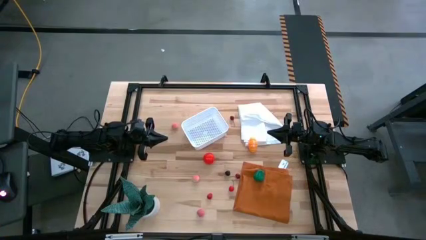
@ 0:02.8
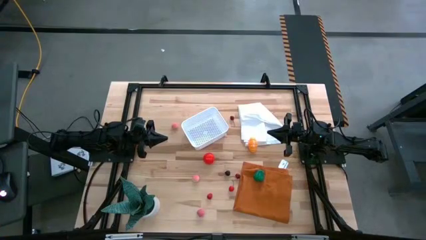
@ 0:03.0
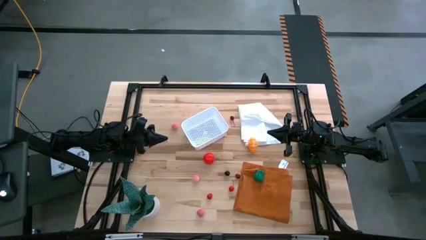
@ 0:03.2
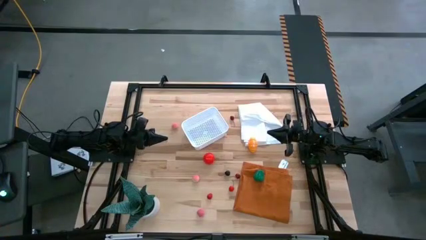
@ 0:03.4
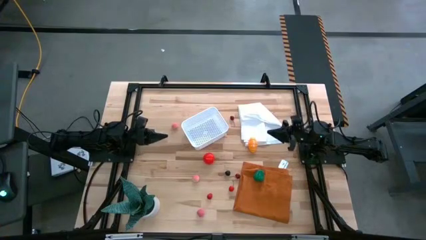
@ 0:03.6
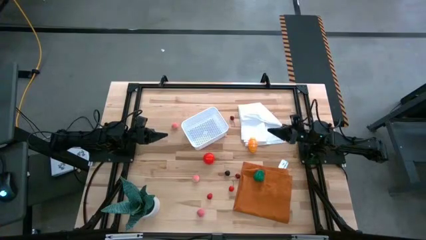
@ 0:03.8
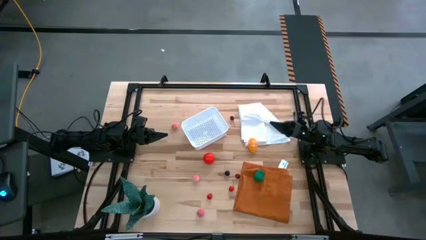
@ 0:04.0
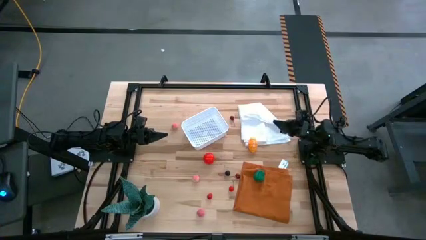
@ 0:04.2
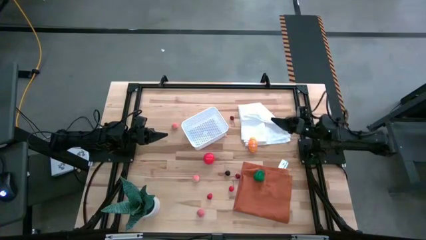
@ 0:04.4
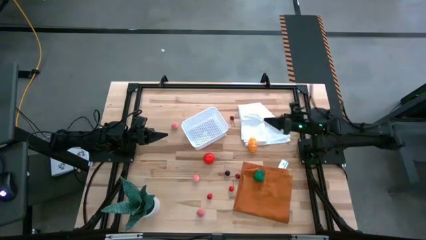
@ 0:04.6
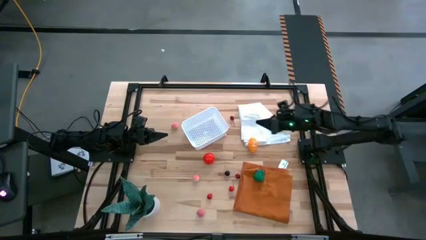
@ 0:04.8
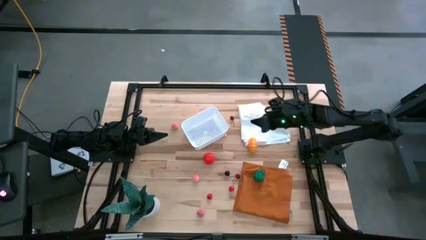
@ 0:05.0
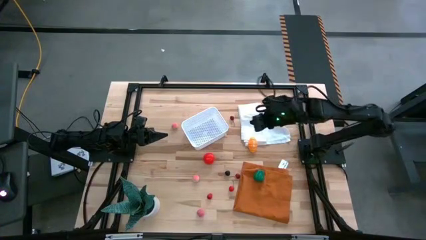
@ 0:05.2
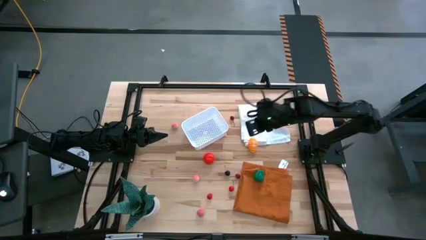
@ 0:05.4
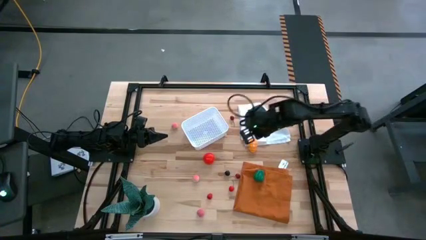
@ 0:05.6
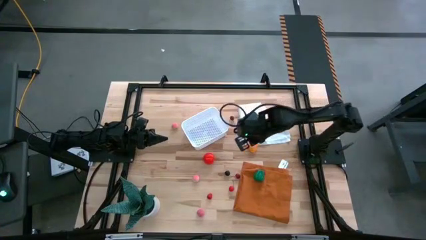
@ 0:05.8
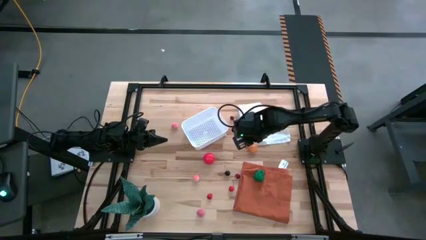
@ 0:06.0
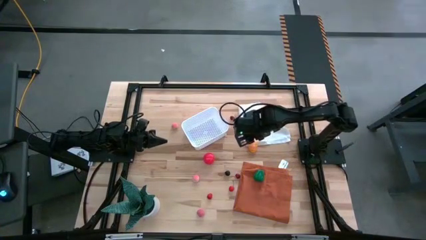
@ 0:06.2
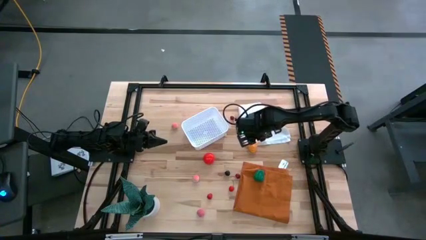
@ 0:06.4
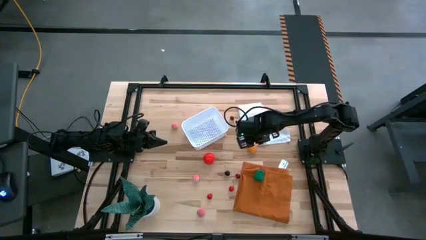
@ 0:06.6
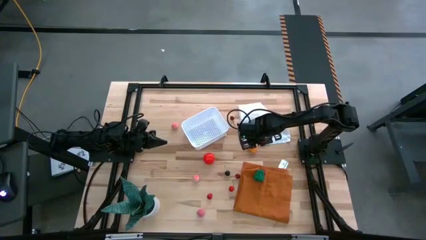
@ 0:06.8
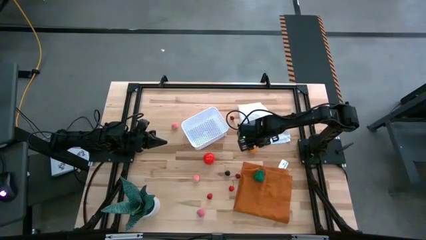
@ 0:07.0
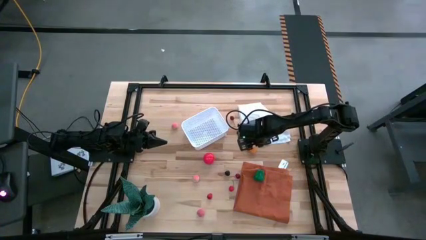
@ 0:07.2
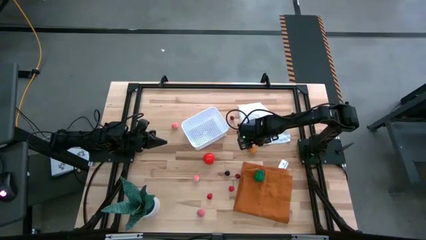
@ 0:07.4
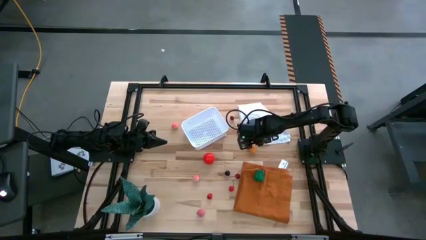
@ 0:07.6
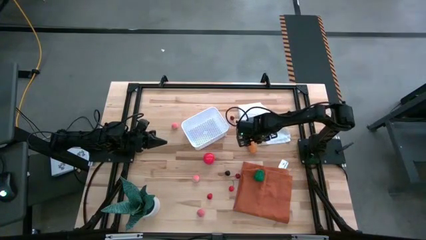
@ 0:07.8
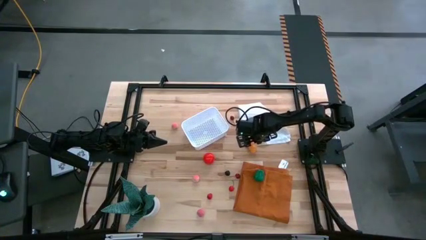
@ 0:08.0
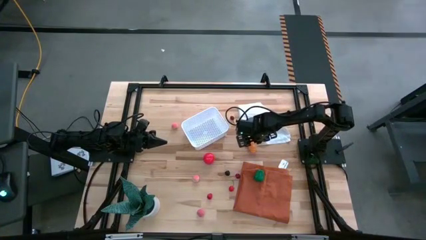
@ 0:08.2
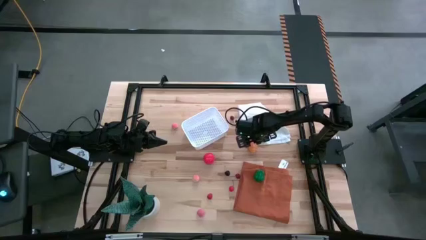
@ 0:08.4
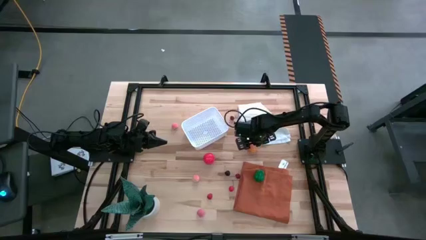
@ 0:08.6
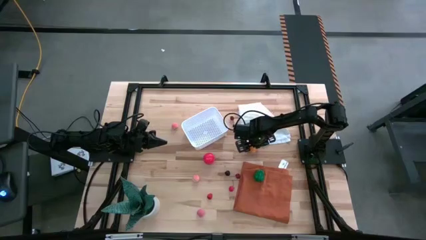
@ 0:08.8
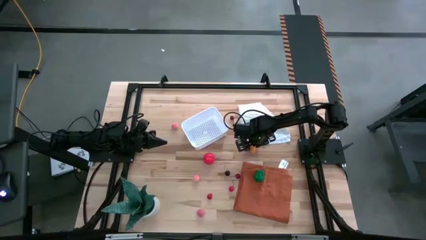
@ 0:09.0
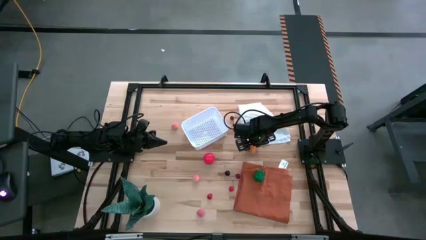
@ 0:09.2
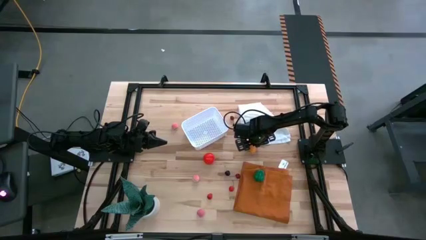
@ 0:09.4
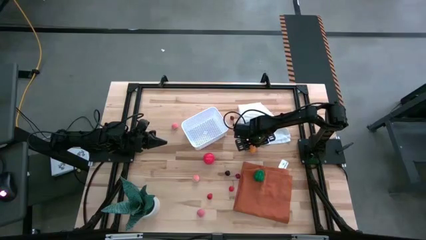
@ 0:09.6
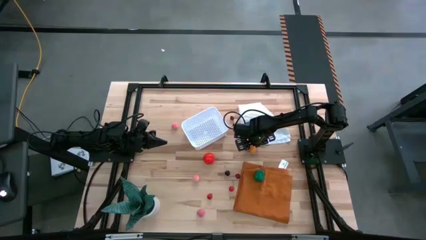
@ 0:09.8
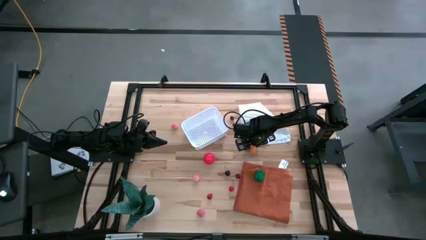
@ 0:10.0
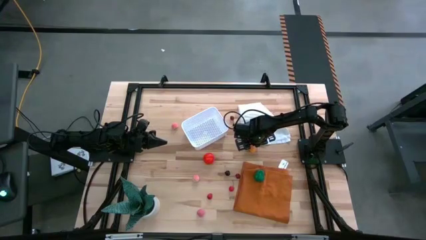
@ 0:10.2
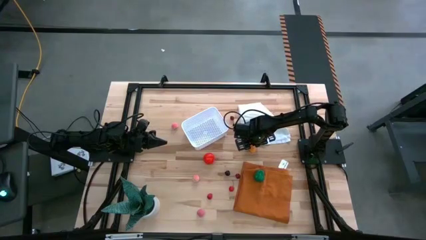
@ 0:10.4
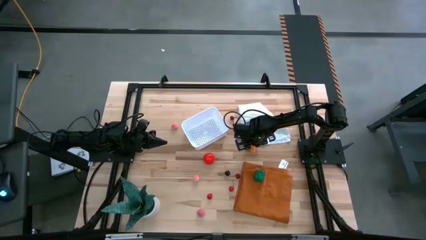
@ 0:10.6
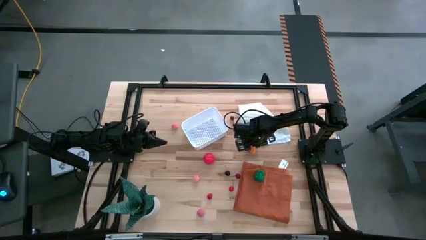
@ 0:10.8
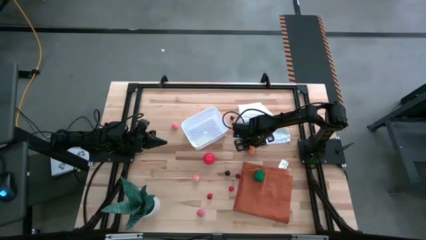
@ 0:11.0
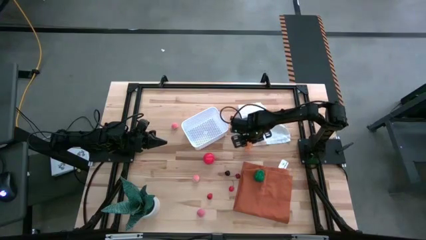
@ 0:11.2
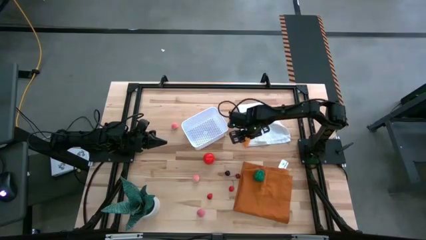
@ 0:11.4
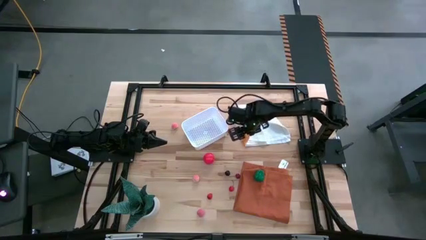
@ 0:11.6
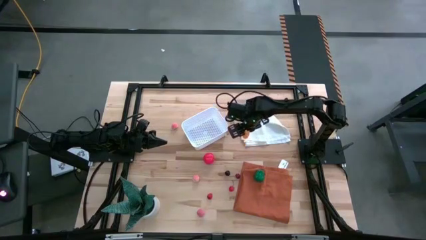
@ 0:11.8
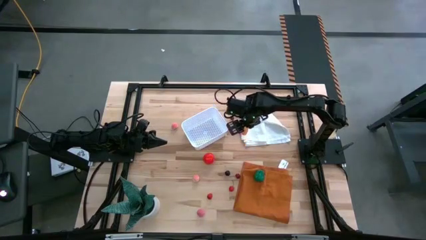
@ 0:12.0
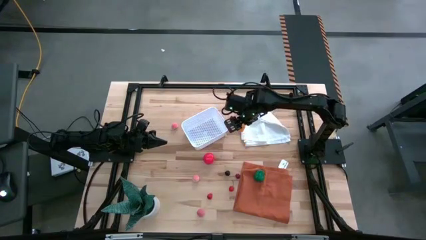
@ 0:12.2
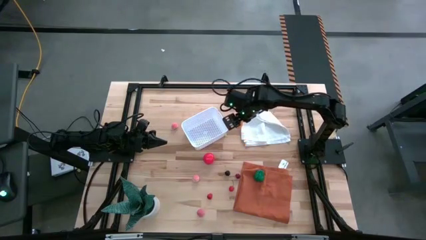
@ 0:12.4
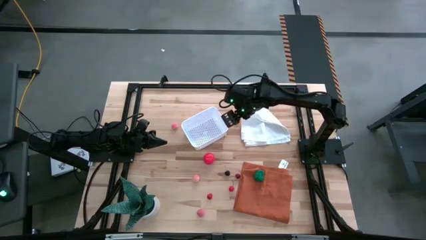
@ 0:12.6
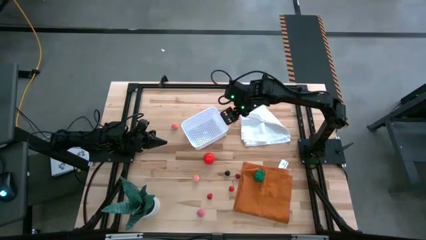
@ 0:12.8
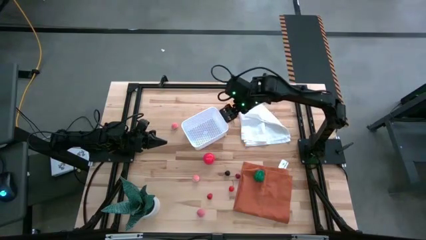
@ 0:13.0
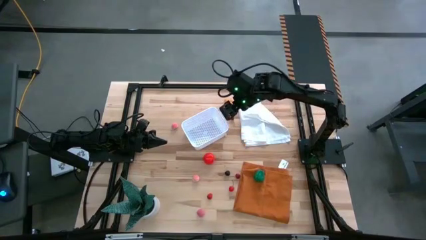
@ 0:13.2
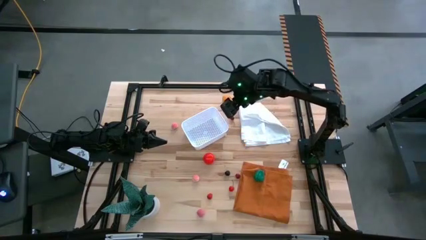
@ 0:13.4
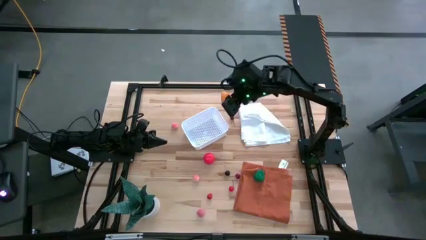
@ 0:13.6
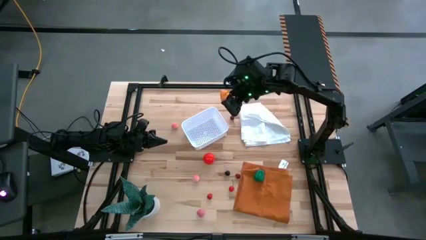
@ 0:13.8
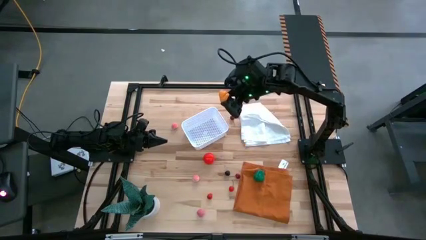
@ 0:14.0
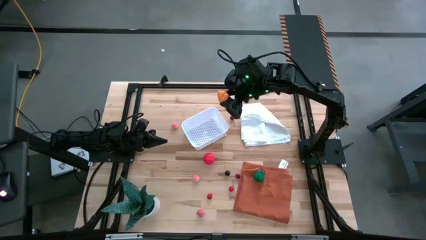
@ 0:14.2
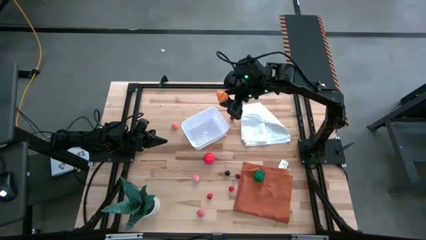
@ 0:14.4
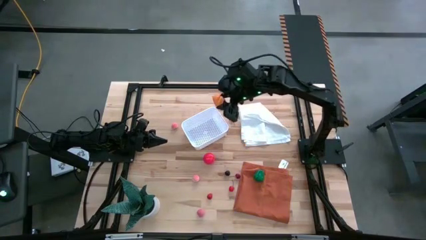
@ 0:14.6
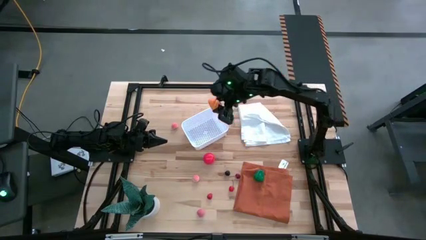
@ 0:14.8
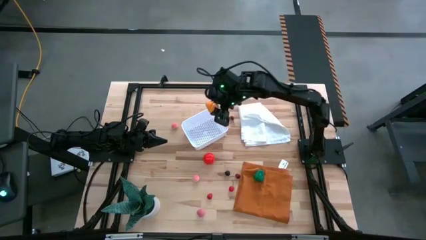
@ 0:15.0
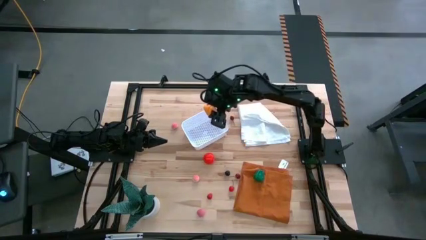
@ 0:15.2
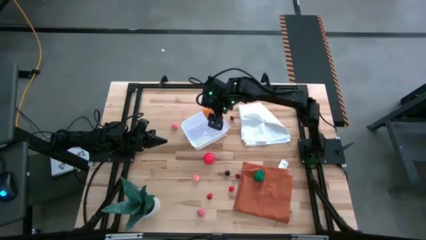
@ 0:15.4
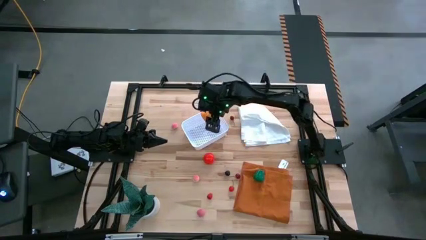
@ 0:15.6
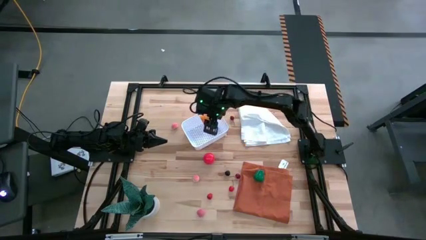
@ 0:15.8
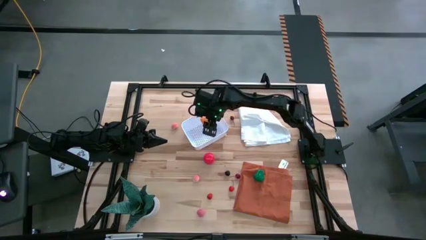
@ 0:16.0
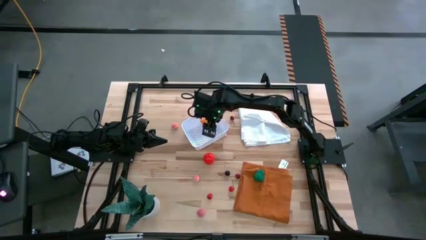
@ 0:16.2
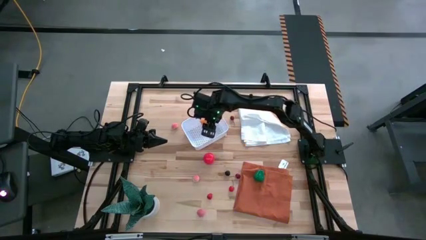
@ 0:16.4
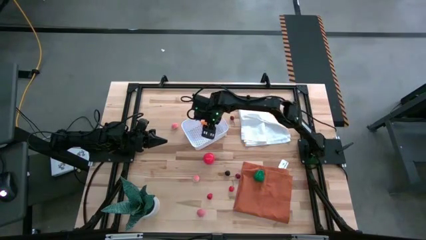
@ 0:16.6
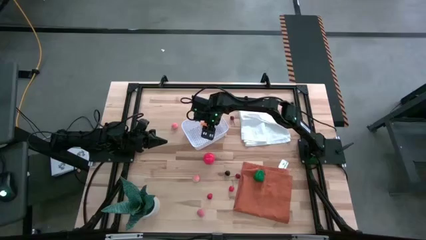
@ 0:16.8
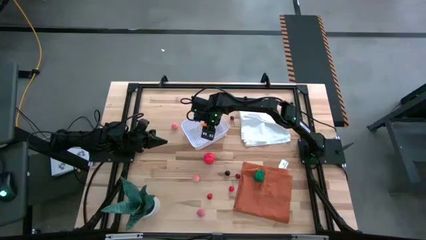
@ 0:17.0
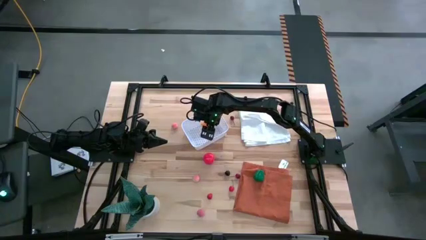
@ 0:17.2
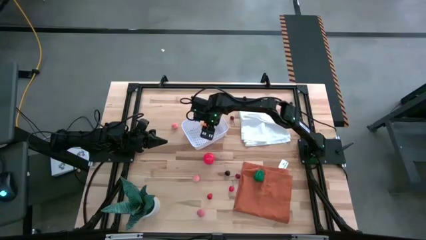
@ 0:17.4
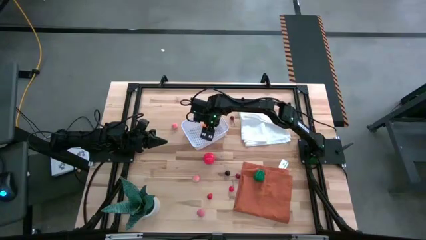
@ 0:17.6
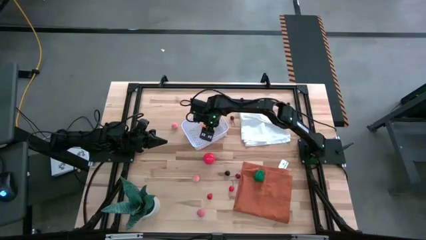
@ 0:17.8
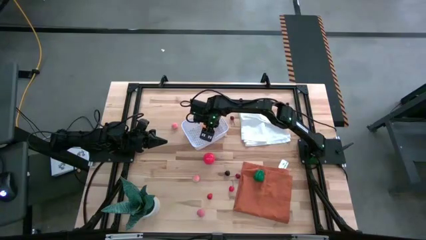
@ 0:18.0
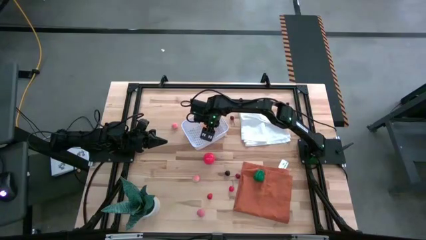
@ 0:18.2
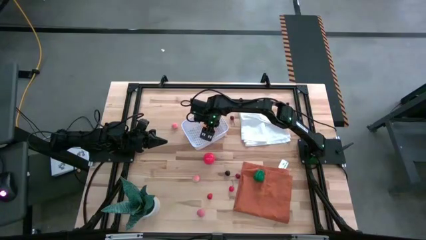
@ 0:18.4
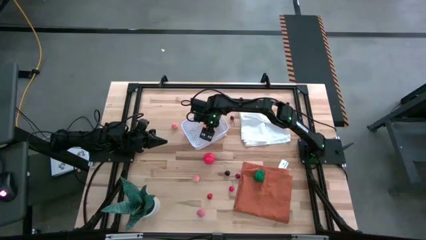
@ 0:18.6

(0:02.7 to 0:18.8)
Task: Pick and placing Produce into tupperware
Put the croissant in the basket
